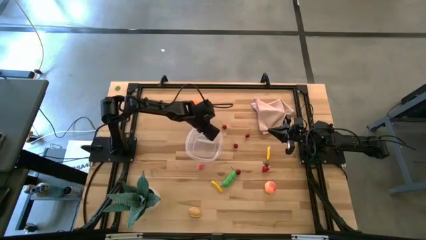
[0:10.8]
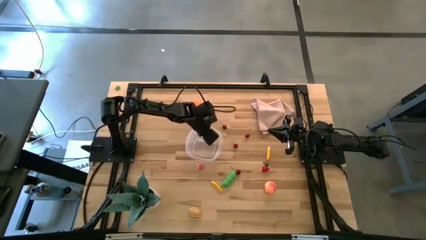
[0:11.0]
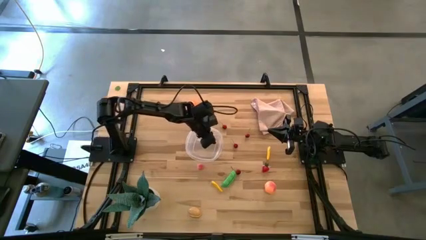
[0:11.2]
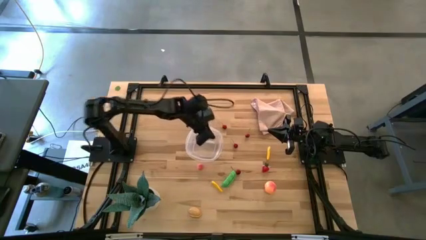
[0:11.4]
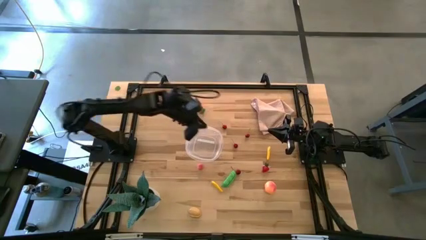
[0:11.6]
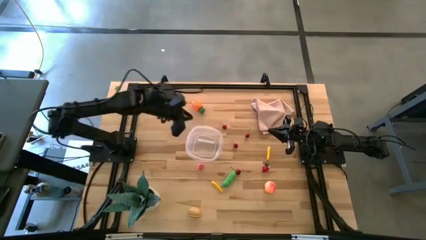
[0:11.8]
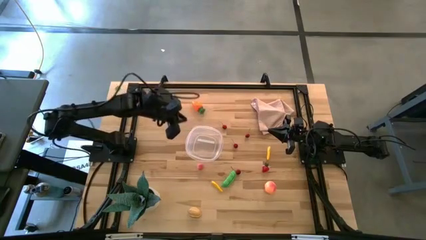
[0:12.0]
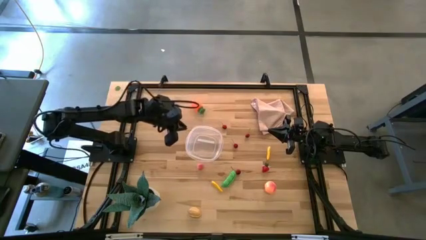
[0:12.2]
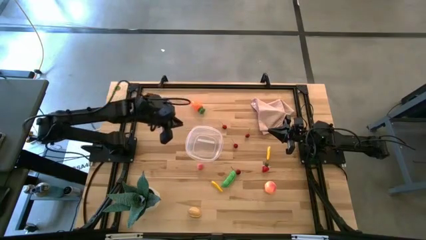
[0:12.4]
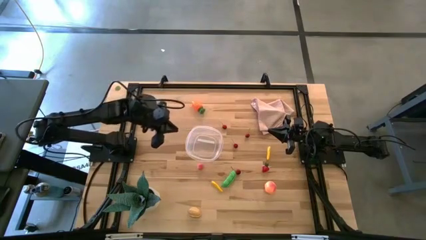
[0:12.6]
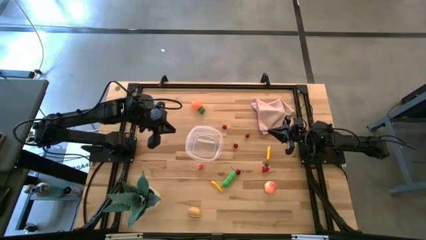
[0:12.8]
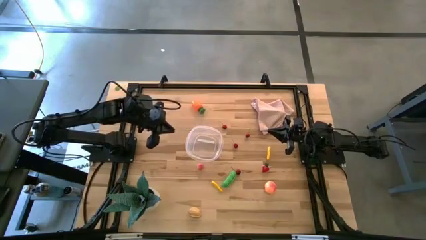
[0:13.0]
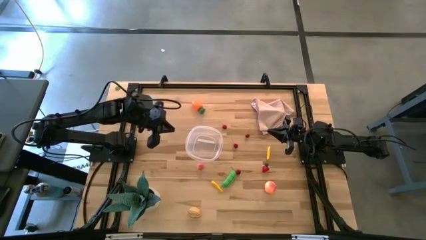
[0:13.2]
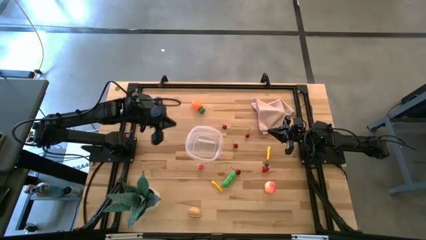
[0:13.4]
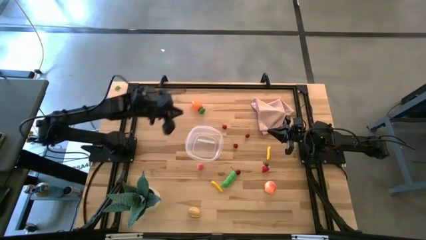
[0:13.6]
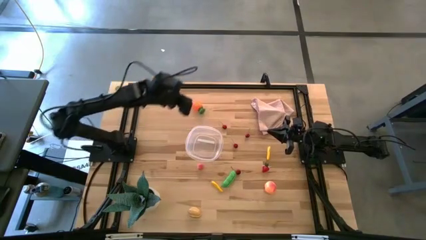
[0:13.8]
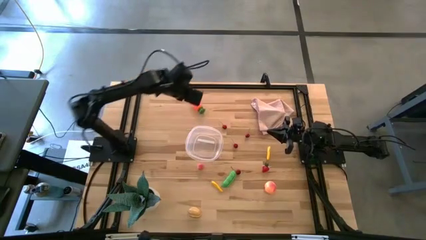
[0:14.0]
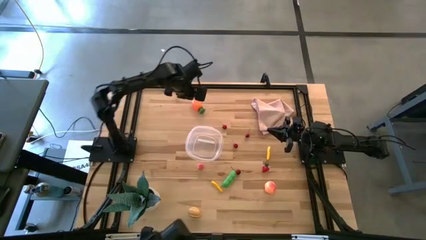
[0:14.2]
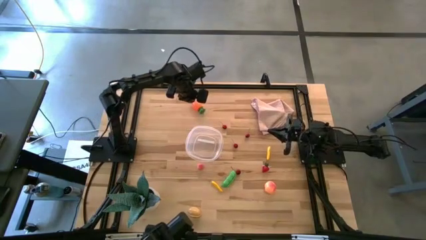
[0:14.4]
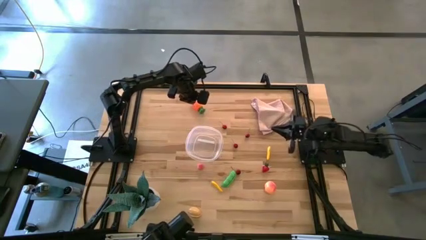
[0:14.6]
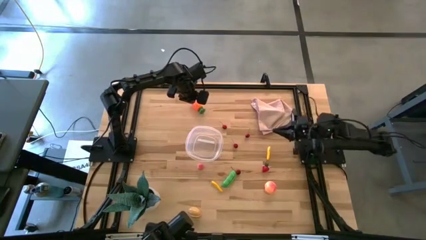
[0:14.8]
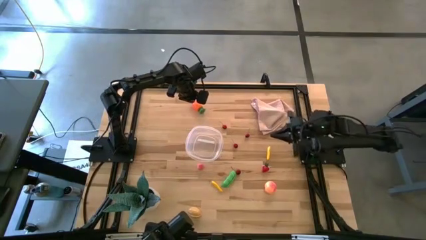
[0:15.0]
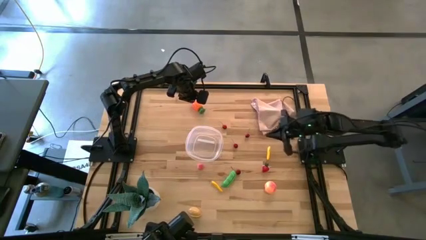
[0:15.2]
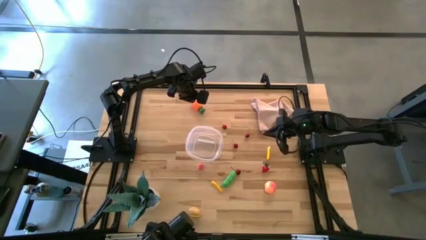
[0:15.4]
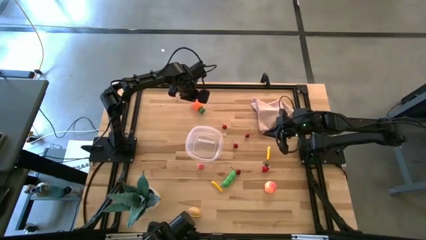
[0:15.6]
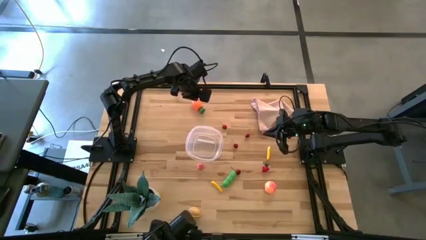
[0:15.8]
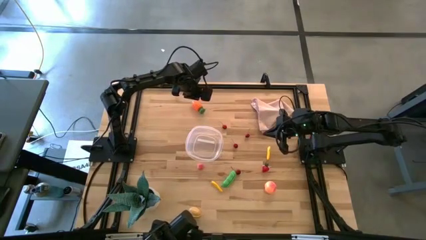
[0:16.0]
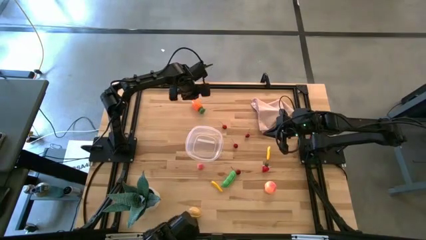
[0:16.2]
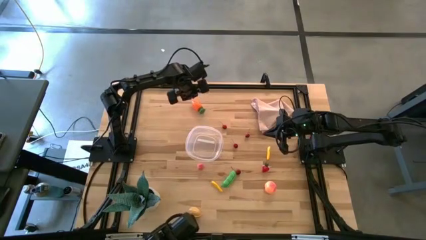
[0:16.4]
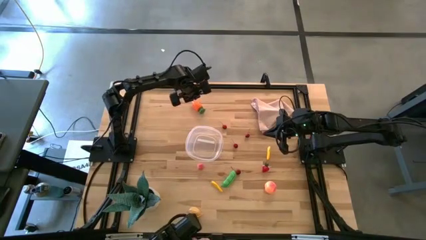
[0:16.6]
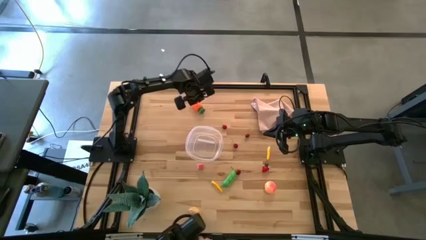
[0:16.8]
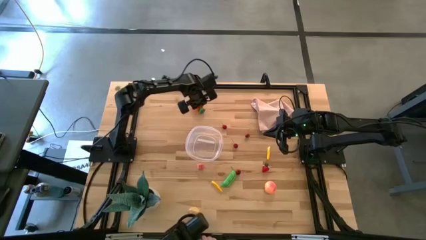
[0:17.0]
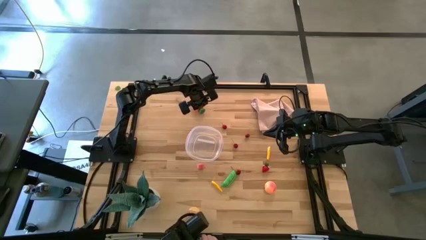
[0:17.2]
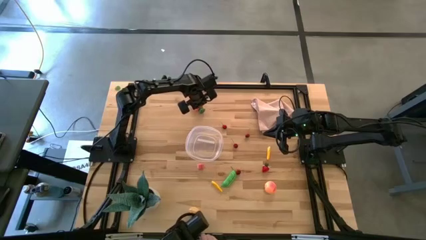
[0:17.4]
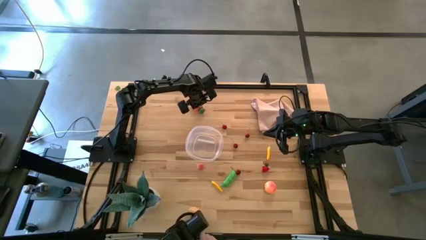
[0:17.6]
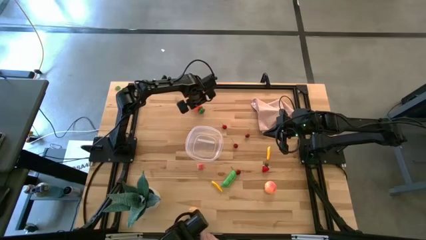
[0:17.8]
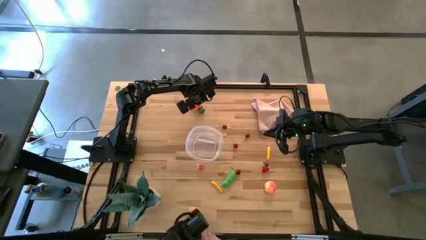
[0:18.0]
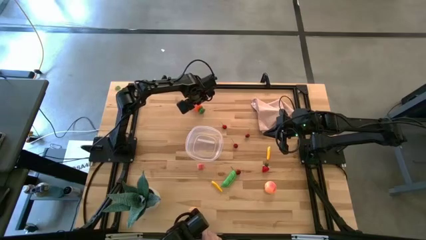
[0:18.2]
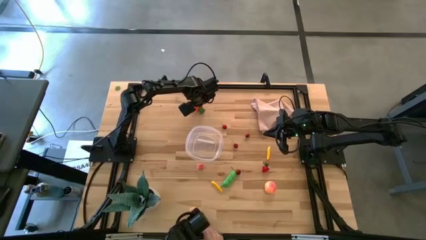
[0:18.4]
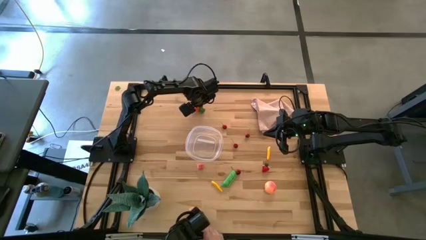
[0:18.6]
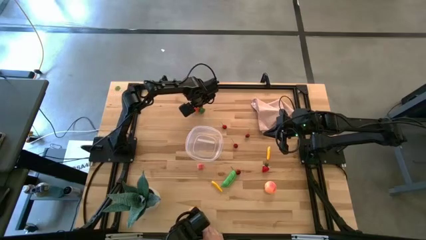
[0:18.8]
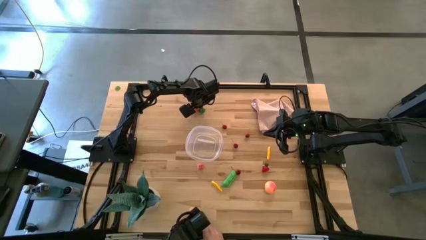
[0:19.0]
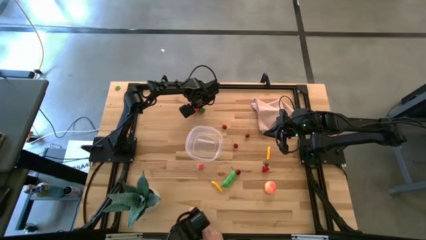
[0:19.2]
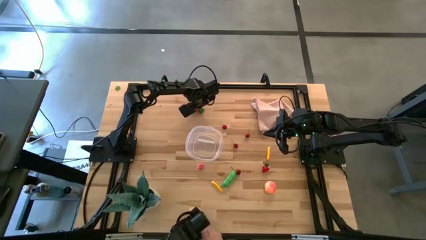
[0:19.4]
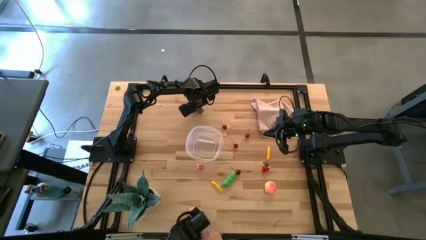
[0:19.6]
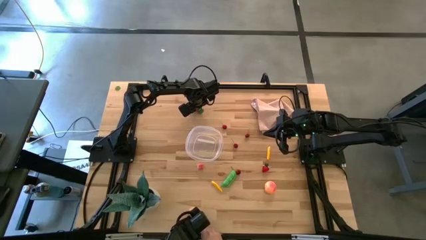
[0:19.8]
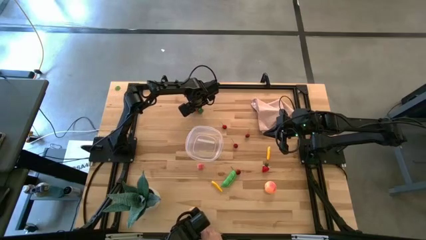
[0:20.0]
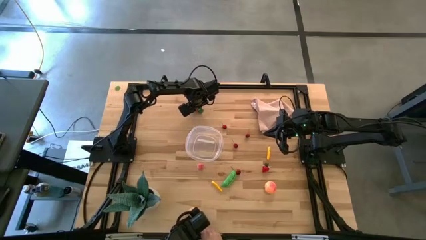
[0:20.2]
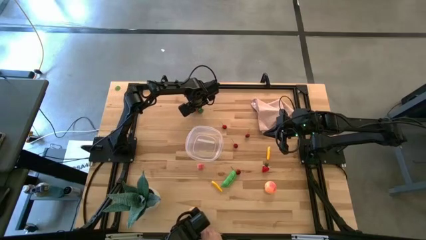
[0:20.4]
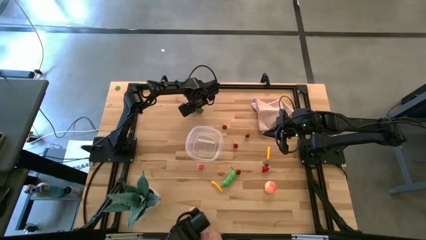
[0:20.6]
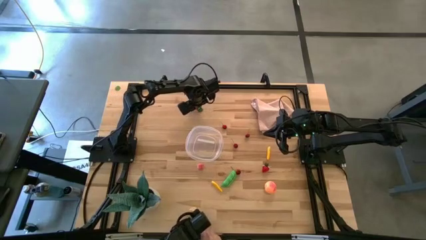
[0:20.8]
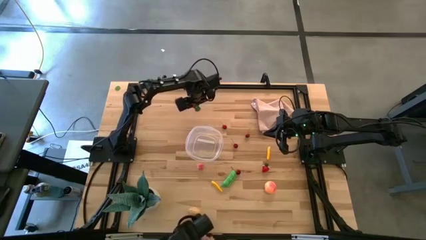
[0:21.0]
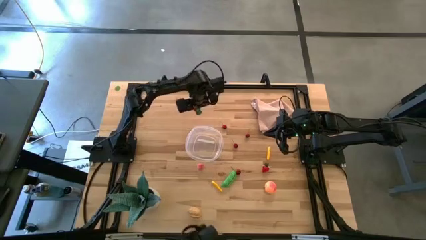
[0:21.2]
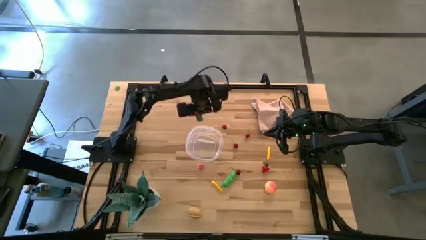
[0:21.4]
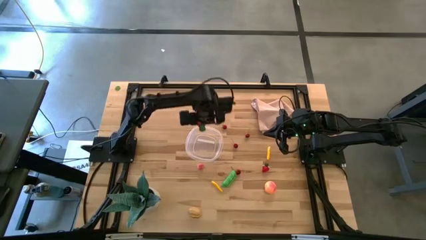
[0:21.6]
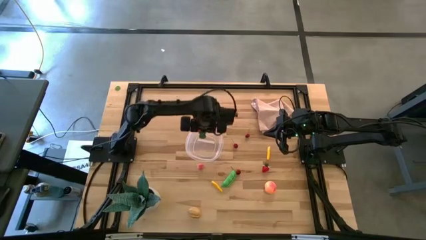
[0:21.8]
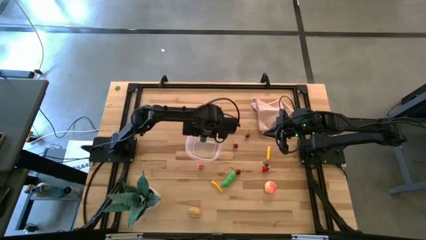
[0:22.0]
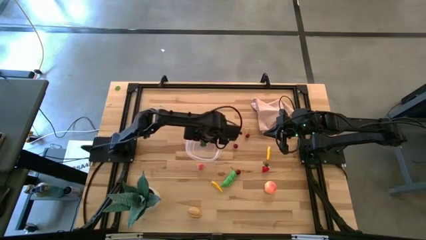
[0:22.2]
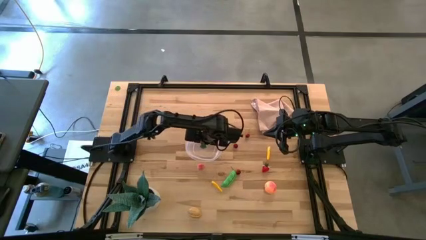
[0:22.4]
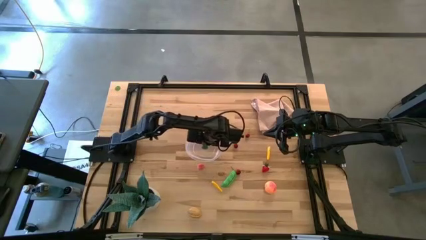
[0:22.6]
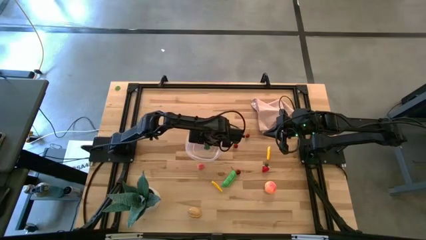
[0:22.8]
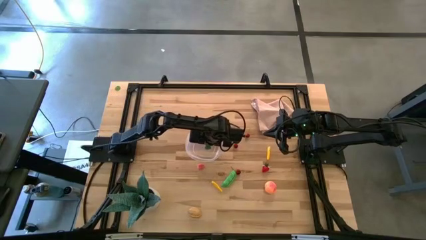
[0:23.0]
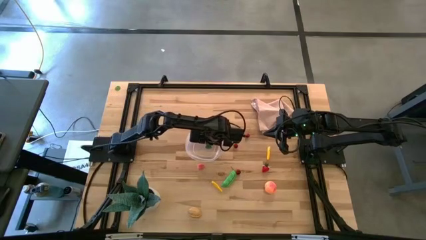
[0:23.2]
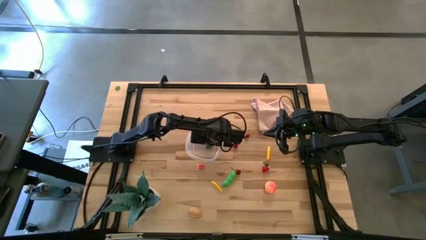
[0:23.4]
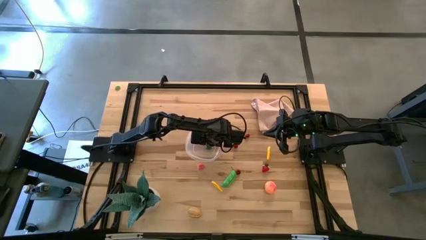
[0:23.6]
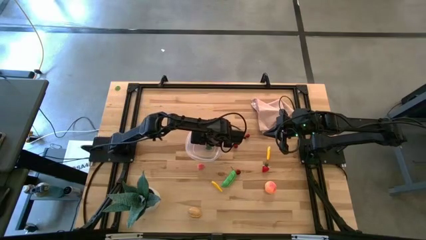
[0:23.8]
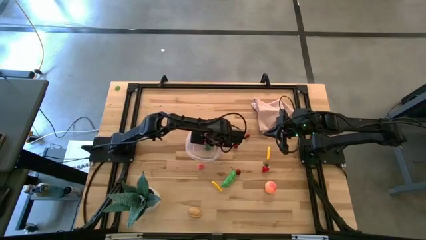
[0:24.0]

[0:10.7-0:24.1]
Task: Pick and placing Produce into tupperware
Put the carrot into the transparent bin

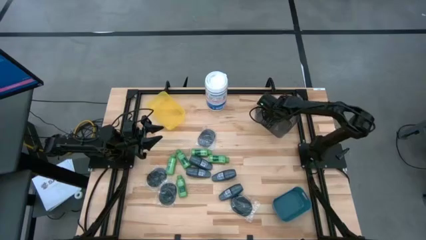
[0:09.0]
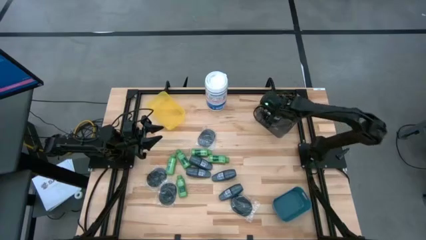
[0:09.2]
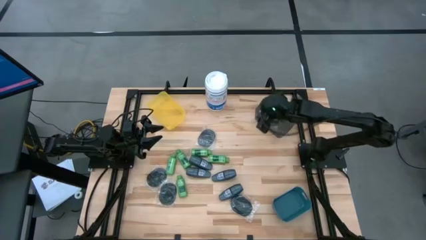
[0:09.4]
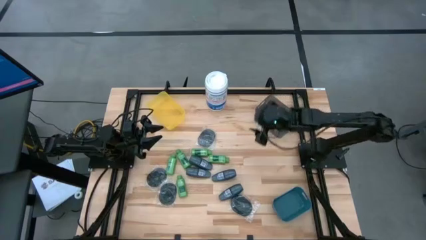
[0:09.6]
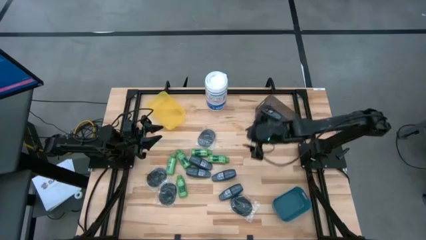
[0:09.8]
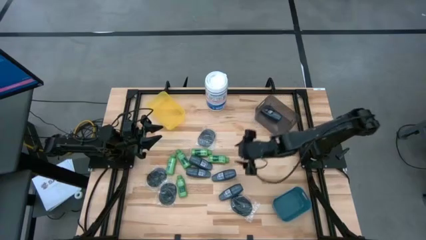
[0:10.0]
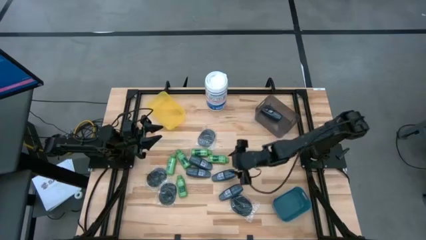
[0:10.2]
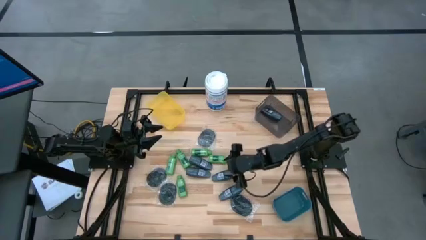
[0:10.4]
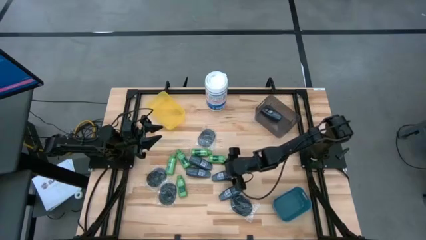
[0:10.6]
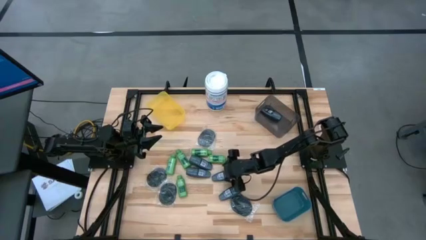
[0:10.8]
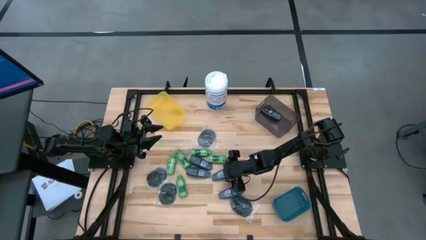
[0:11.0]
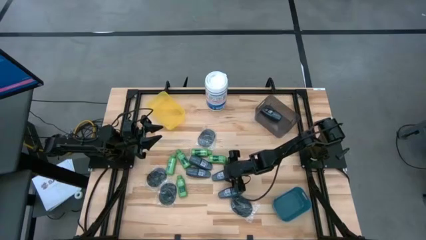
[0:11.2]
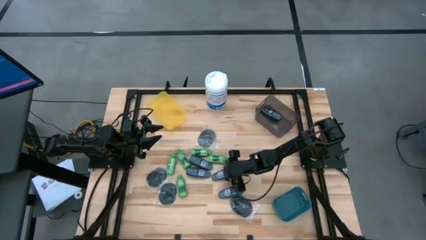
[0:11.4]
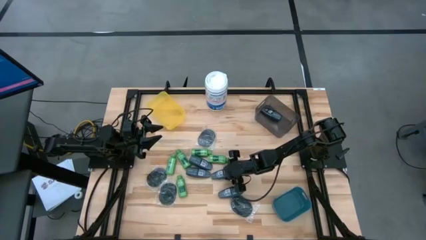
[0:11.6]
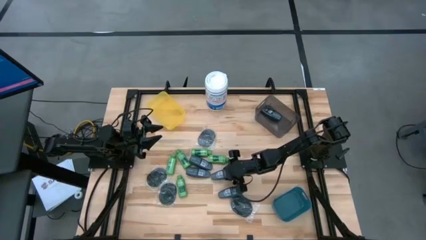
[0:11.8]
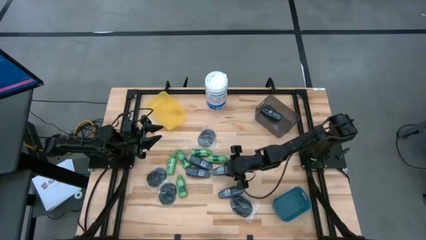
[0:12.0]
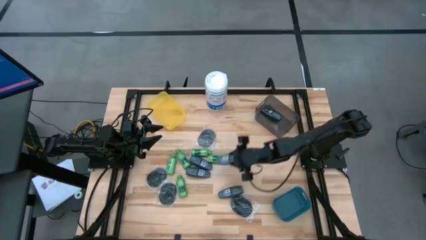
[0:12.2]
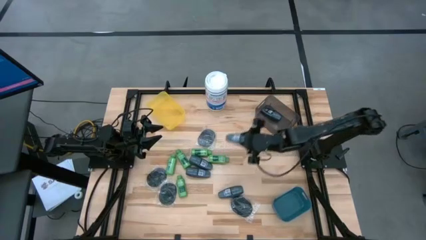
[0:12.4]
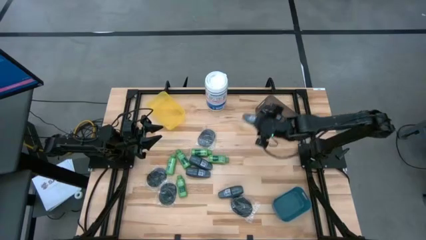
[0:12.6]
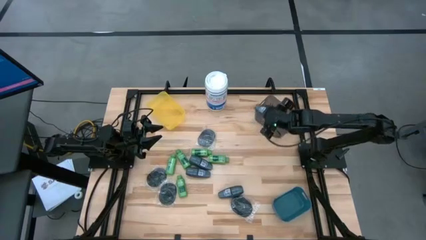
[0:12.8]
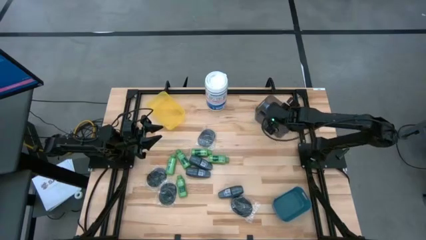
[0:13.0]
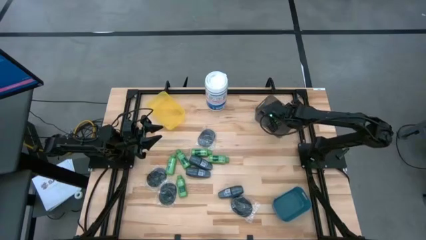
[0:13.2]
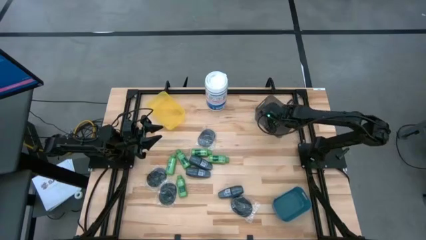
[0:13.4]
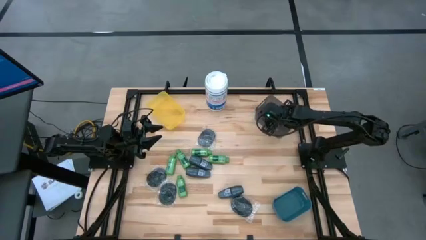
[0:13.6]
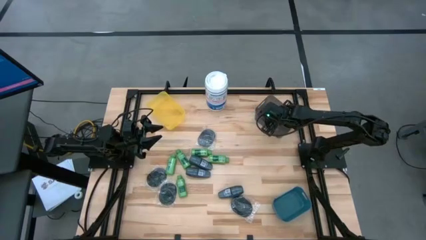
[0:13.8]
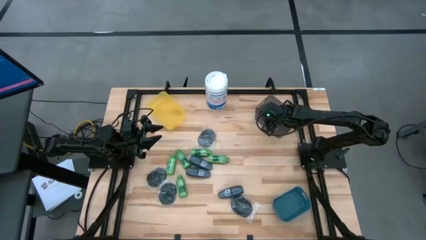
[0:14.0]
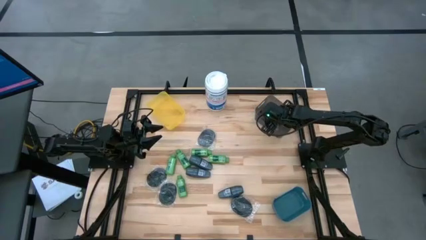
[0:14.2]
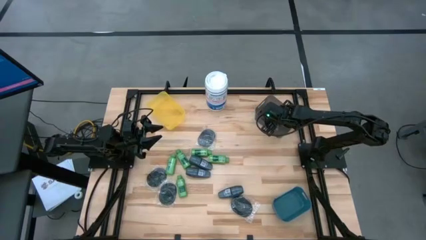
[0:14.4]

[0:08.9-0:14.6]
Task: Pick & Place Travel size toiletries
Put the gray deodorant into the black bin
